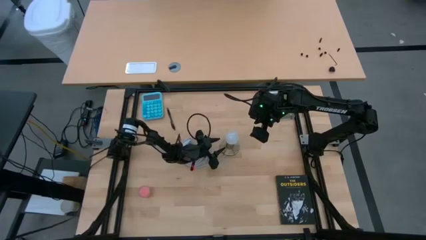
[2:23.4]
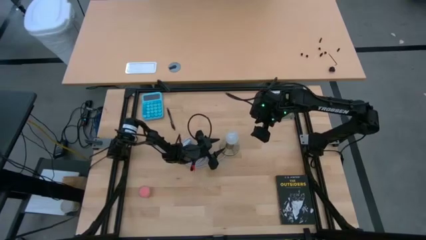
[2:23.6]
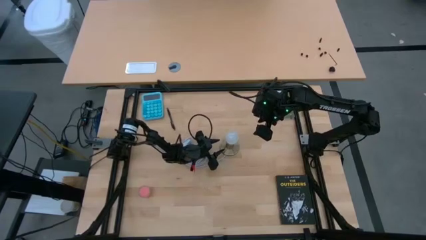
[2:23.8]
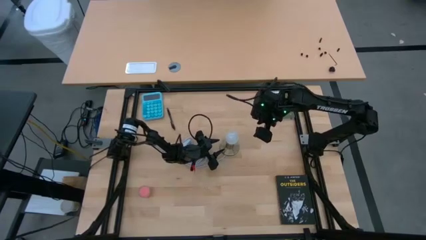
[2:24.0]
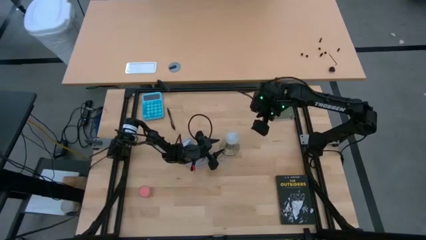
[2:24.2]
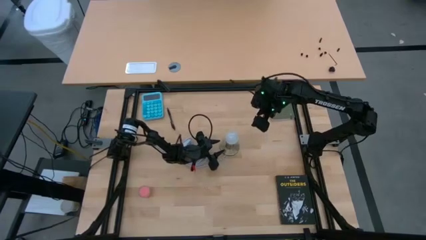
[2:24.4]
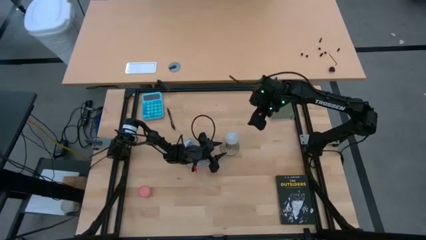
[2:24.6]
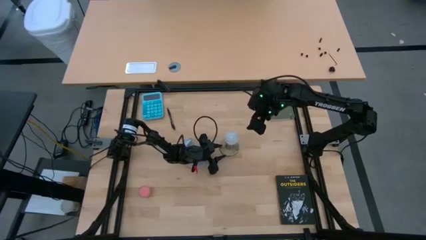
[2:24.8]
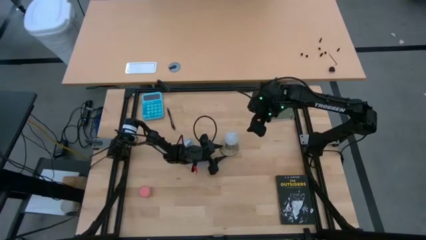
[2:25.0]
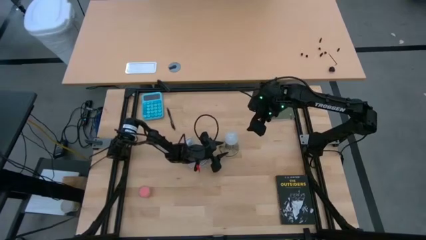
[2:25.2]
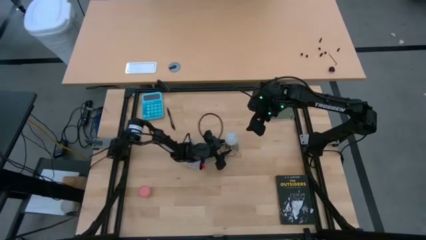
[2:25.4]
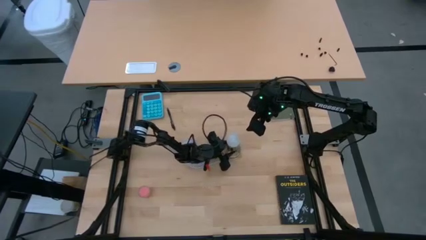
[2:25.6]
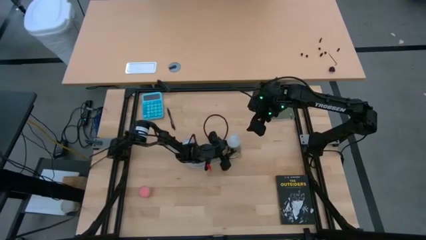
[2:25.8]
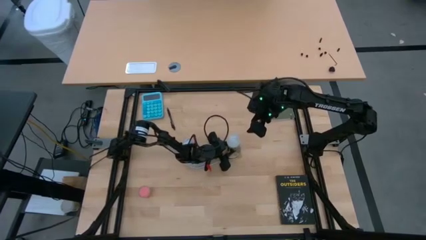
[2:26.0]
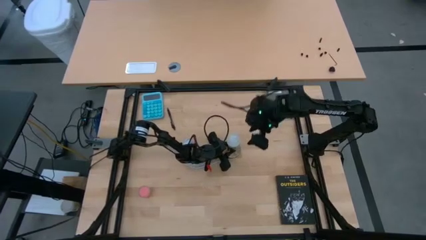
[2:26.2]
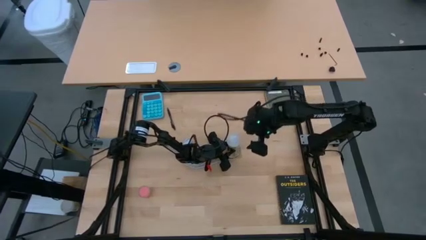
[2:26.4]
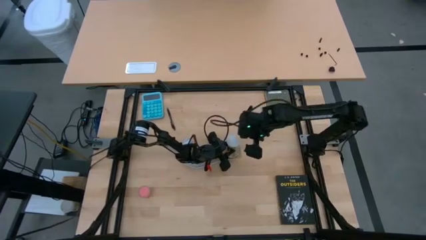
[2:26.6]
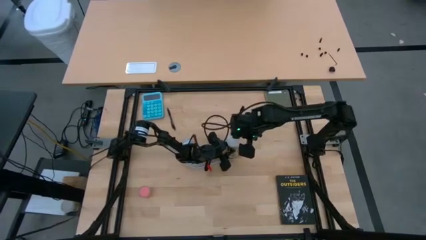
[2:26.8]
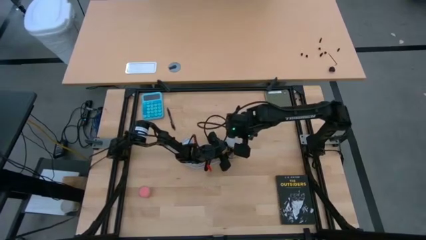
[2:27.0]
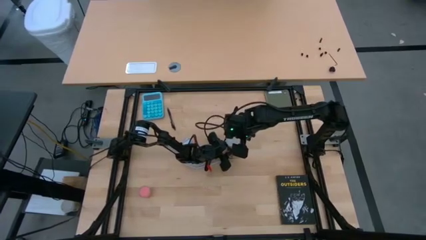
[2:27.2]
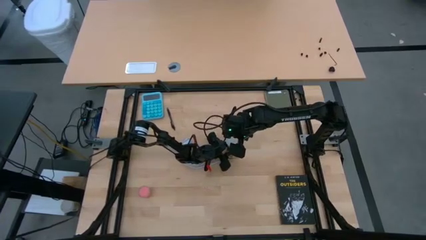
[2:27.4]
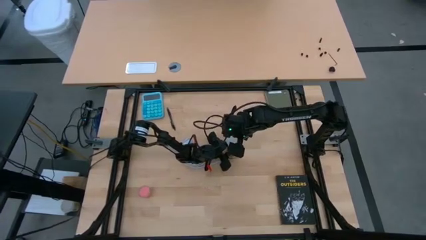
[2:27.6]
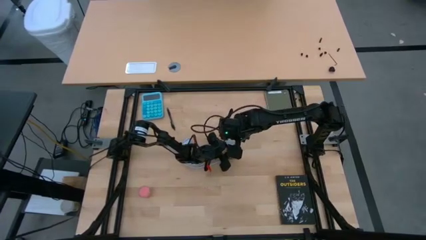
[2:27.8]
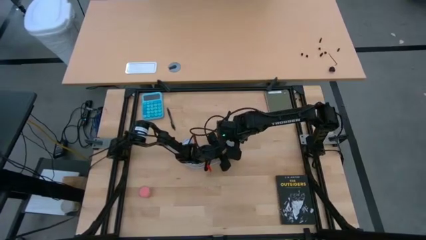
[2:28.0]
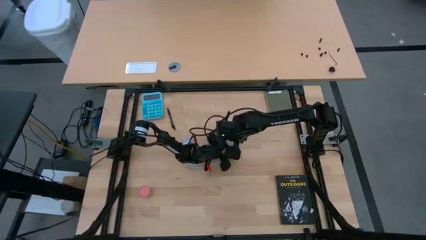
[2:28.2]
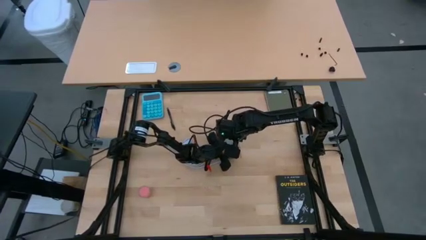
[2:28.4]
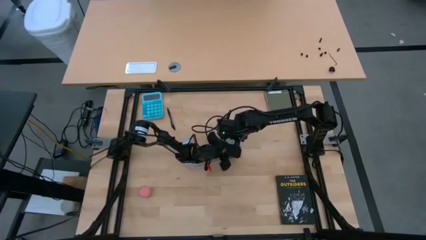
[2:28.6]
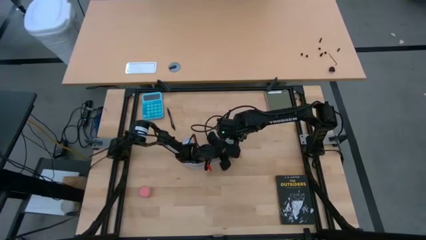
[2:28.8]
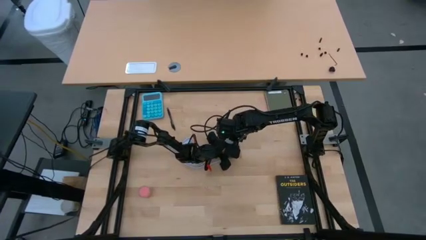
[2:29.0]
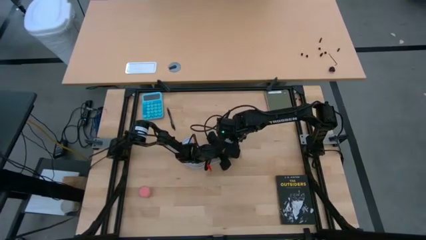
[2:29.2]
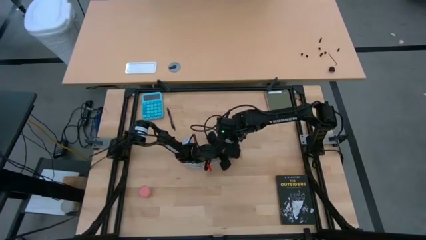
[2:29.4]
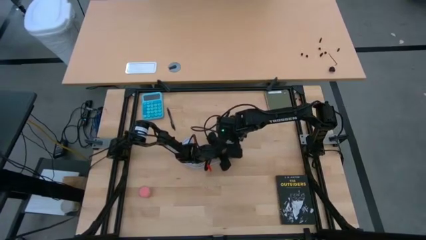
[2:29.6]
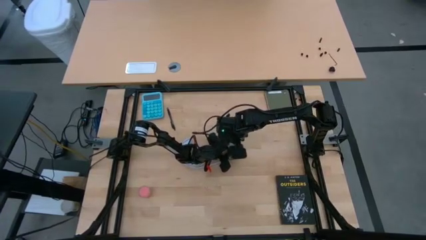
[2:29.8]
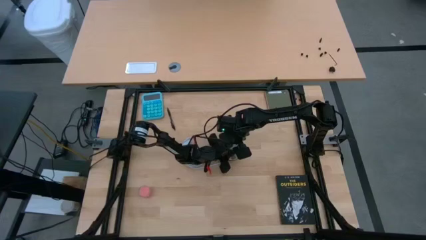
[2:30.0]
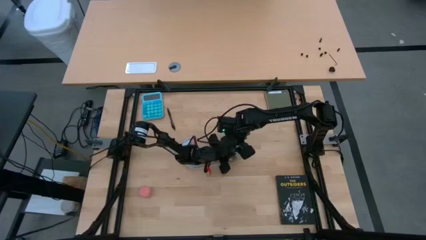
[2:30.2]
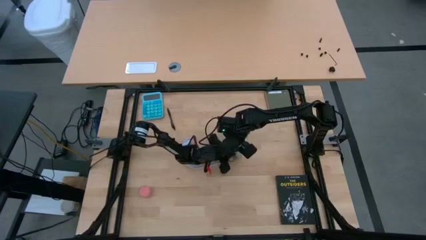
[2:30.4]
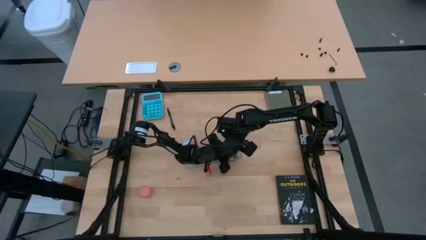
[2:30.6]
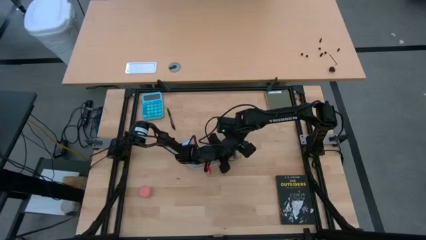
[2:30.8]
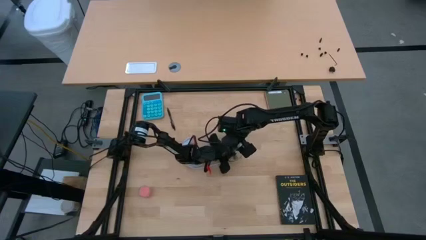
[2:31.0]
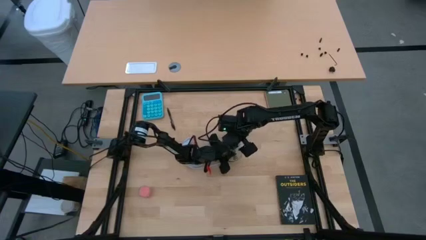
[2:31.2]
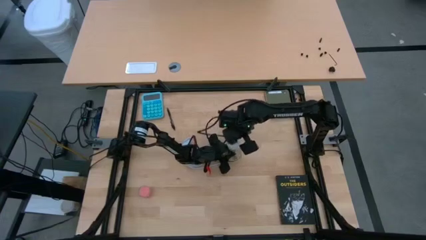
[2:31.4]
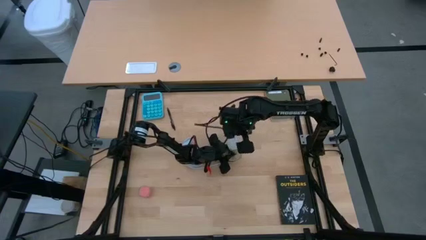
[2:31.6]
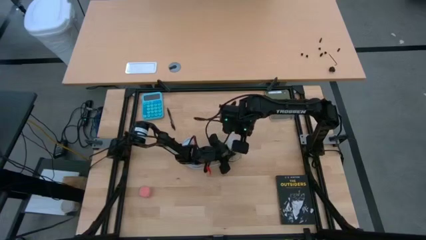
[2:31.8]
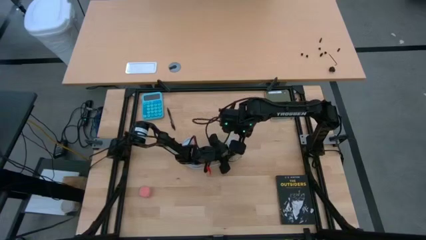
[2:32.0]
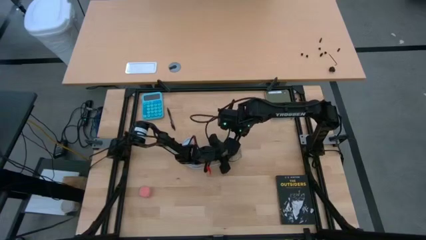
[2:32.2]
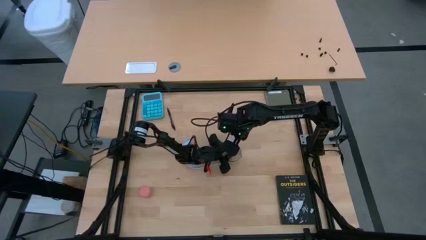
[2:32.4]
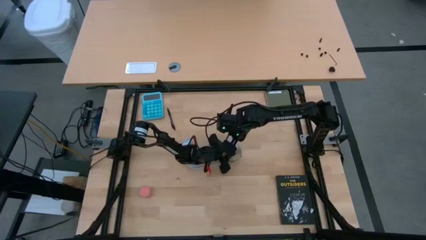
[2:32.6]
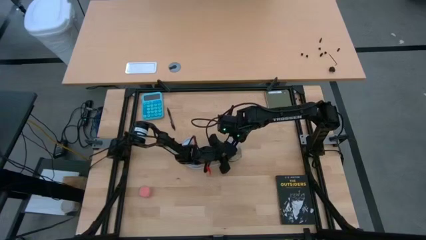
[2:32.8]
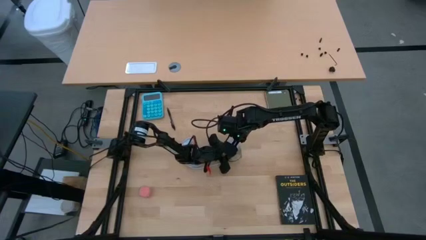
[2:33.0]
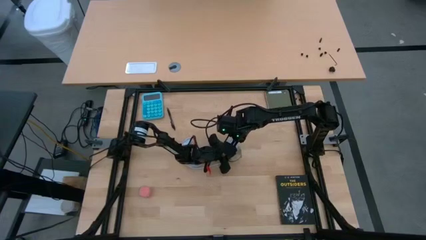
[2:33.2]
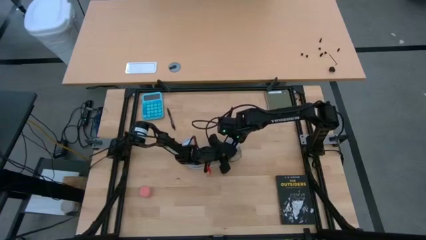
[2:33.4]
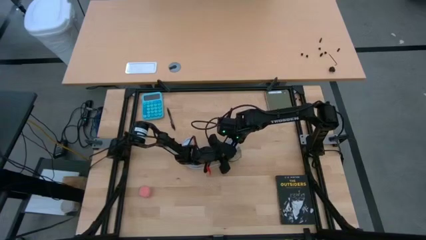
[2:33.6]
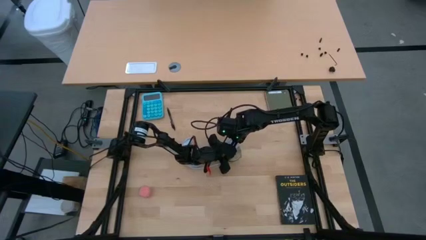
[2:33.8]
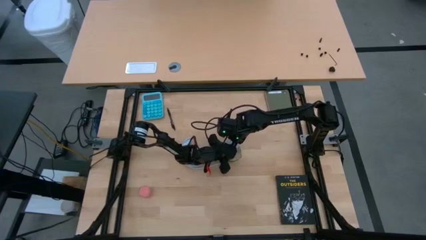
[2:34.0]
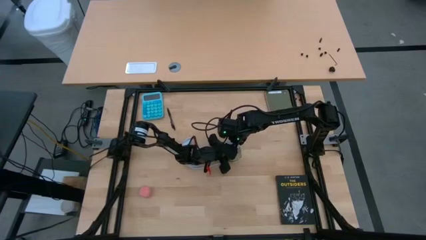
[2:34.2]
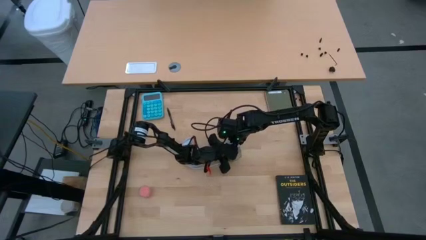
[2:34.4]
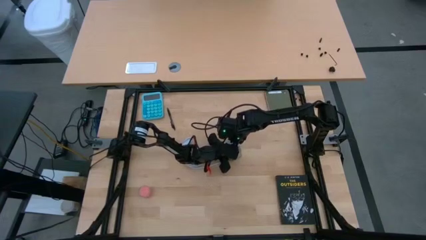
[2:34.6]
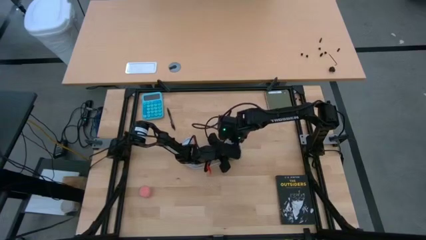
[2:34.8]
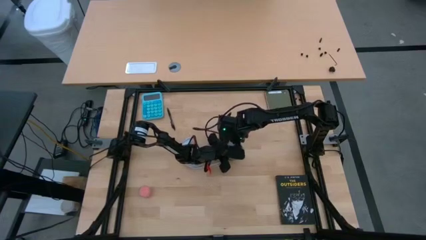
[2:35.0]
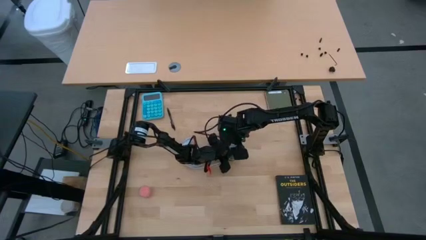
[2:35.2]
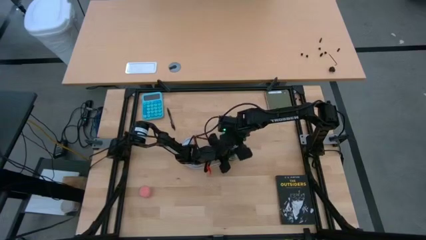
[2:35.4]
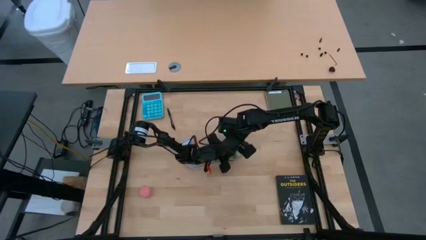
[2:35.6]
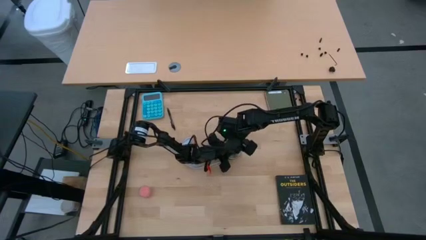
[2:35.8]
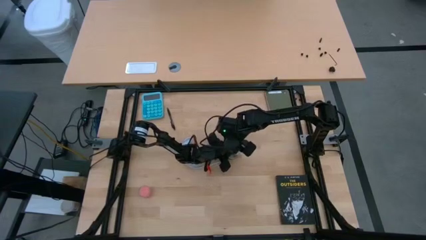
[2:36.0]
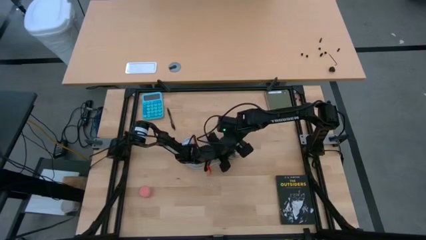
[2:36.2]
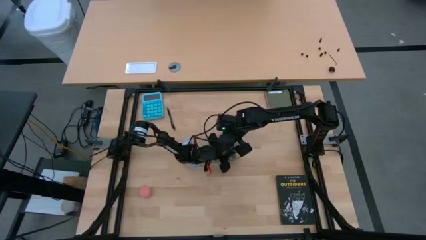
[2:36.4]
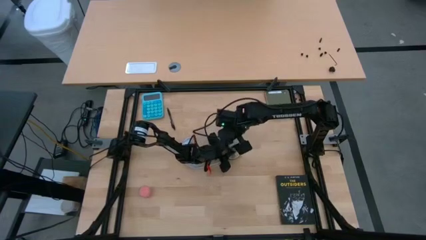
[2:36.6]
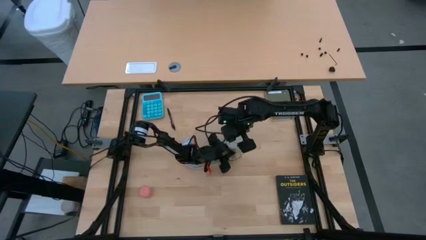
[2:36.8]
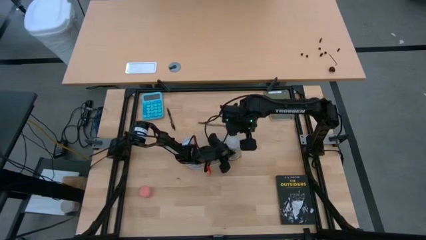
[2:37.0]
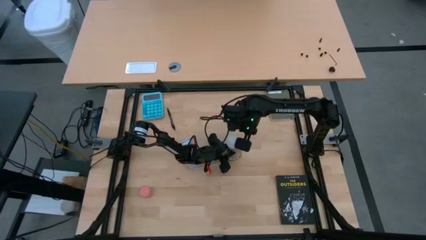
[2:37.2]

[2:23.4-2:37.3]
Task: Screw lightbulb
Remove the white lightbulb from the desk lamp

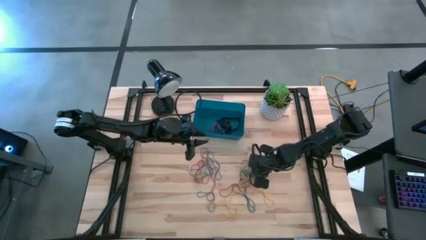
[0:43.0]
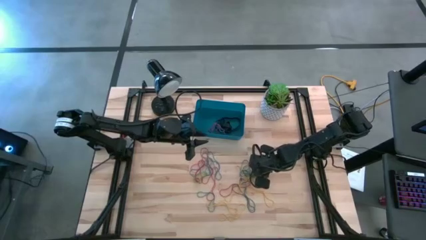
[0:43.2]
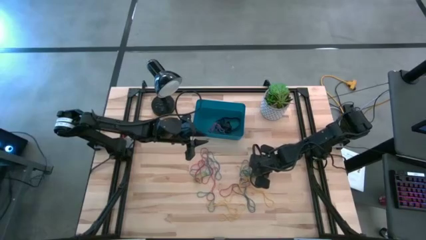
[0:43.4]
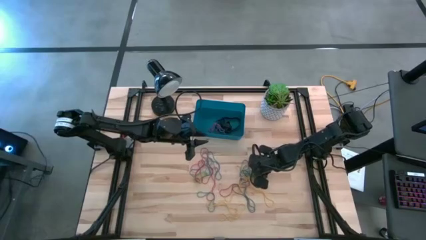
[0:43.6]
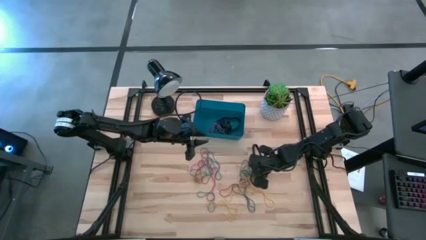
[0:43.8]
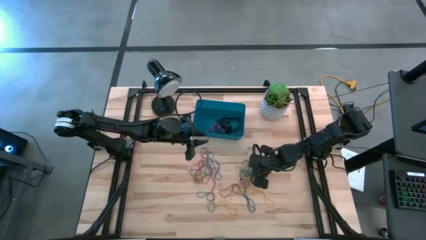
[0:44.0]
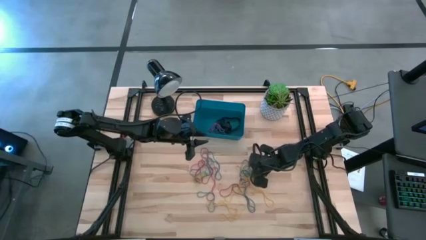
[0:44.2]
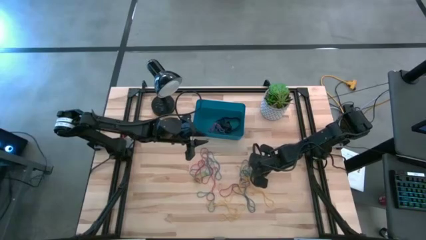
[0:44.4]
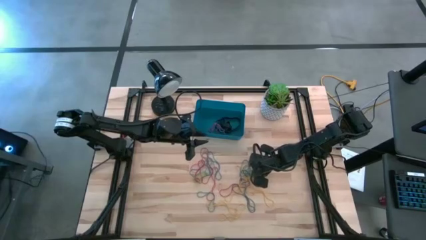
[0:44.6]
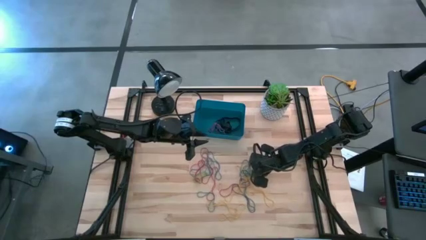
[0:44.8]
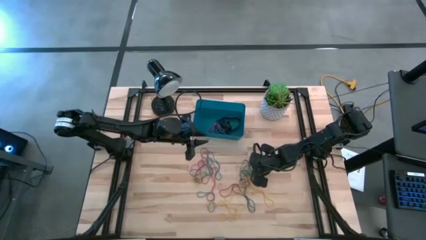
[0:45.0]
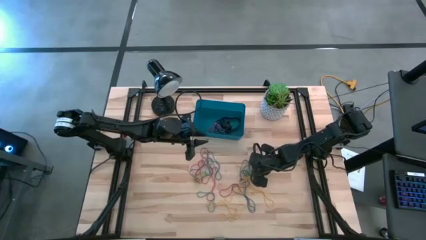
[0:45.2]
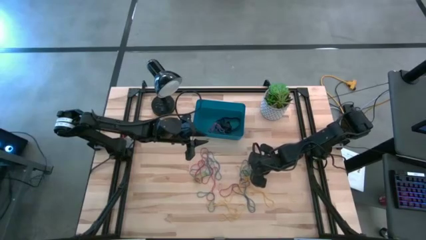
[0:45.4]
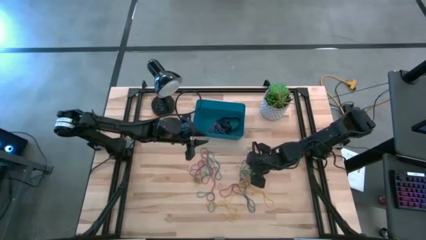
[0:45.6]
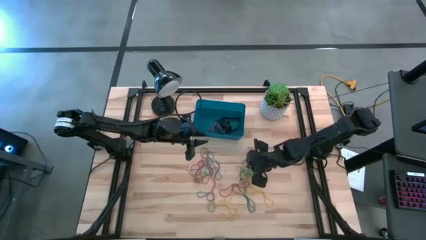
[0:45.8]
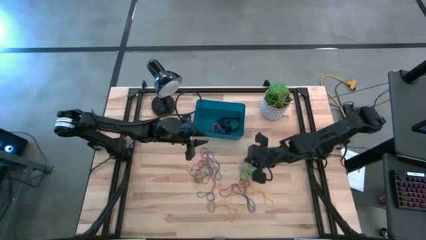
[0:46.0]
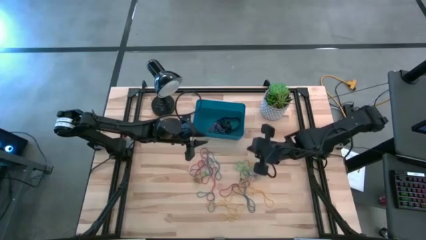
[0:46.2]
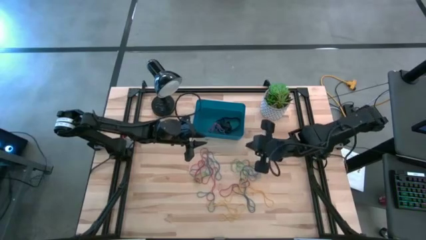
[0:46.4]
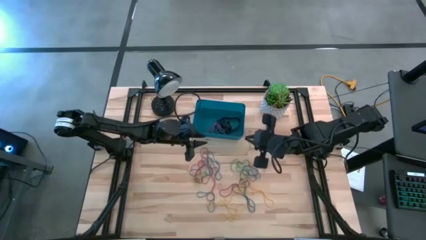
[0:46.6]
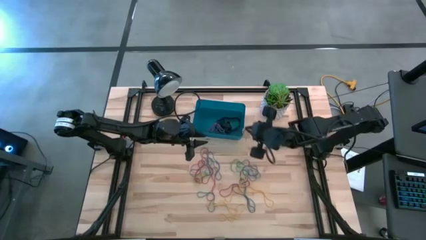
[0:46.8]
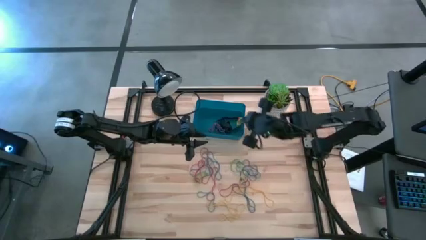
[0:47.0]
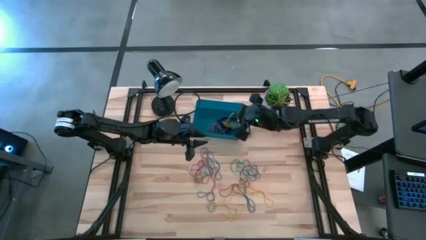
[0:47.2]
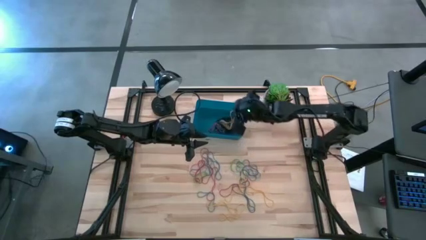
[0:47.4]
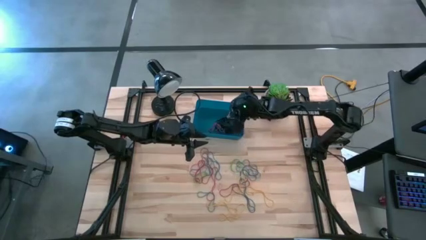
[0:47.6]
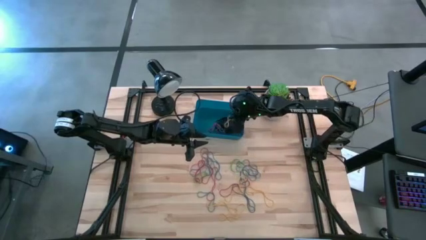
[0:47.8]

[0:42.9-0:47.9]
Task: Pick and place rubber bands into bin
Put the yellow rubber band into the blue bin
